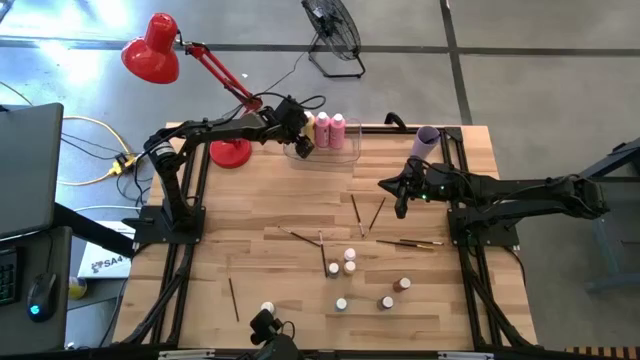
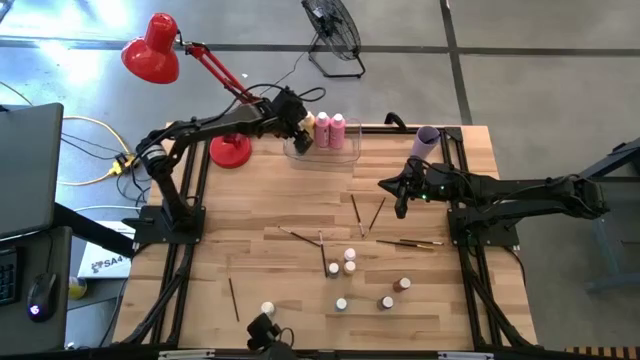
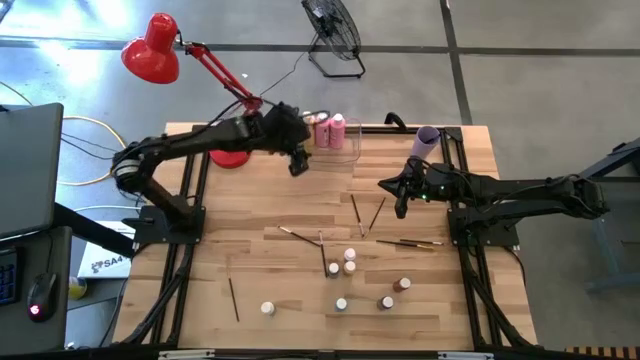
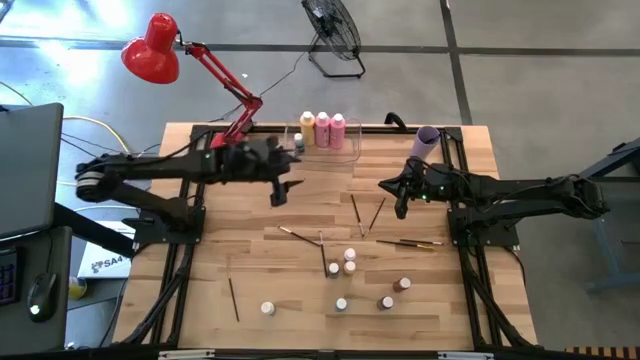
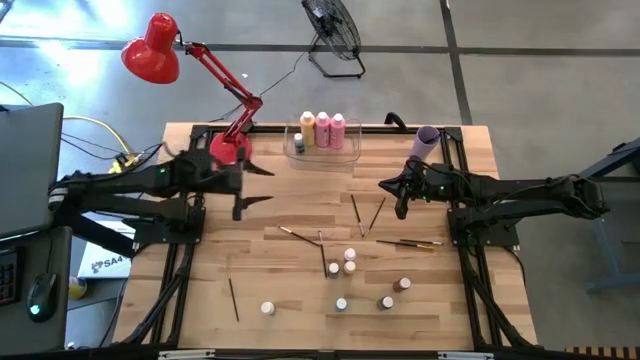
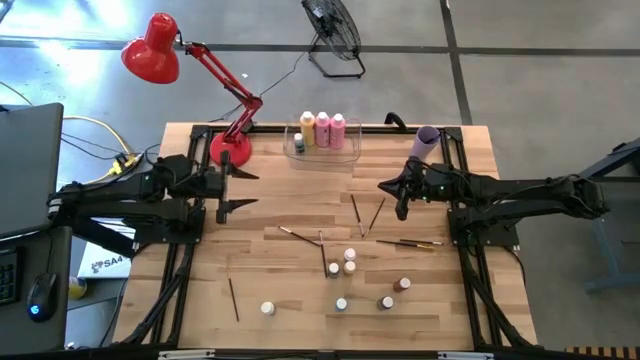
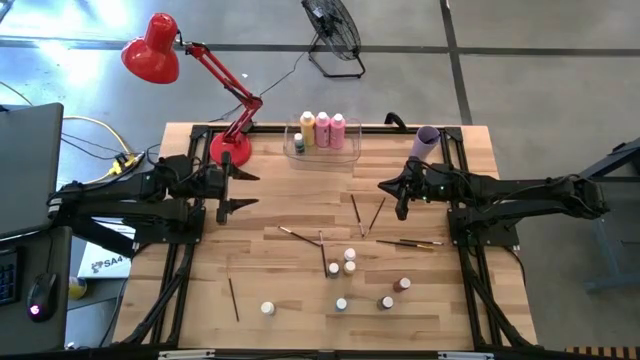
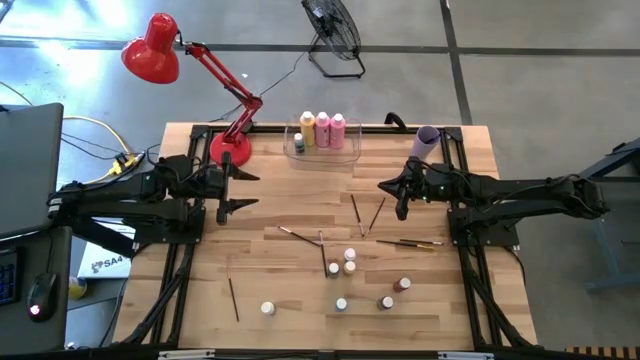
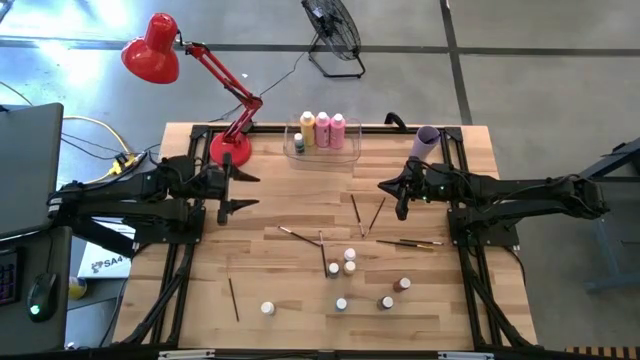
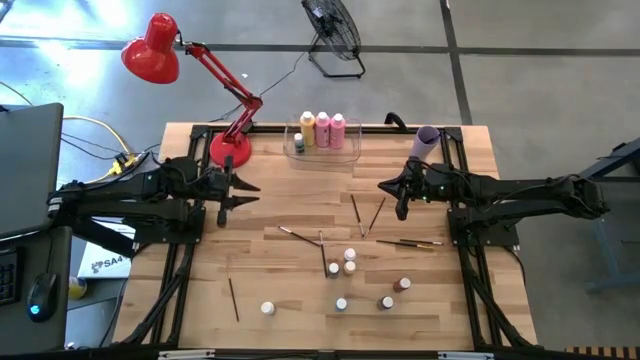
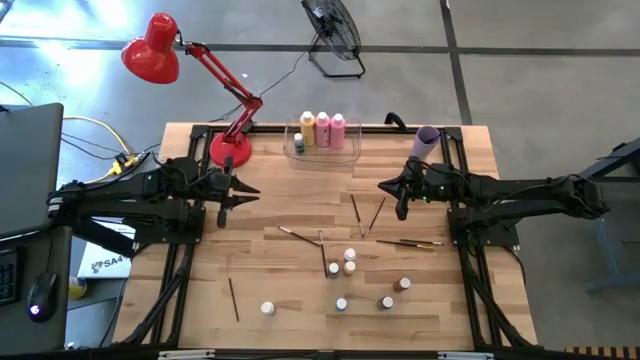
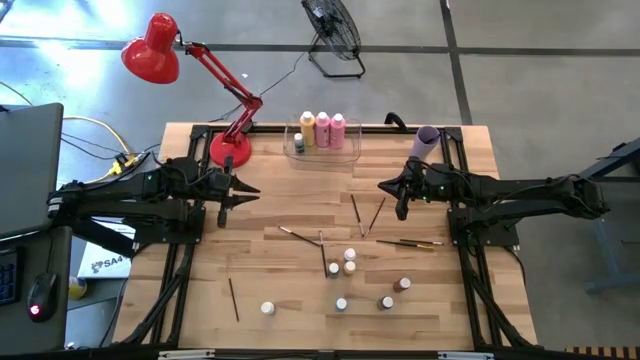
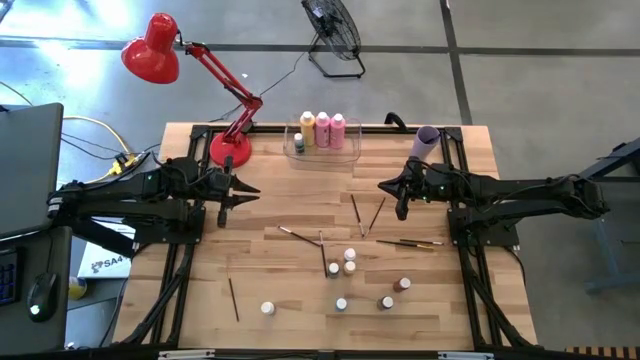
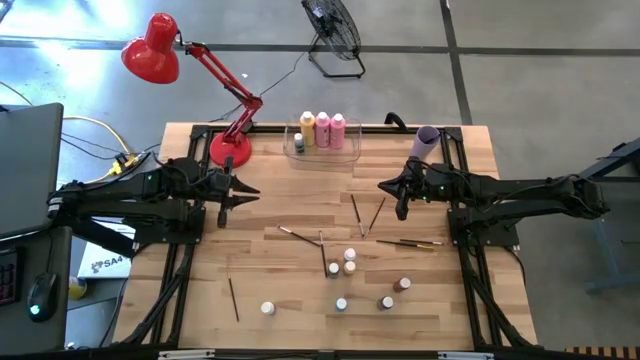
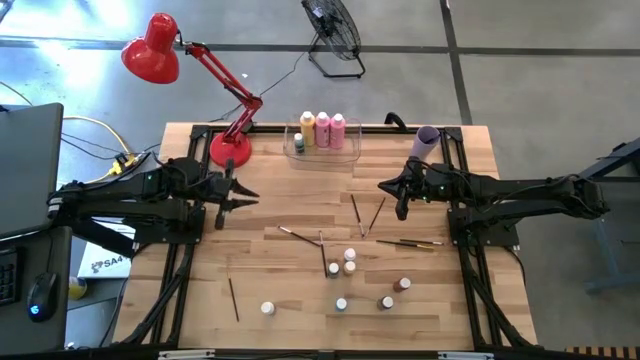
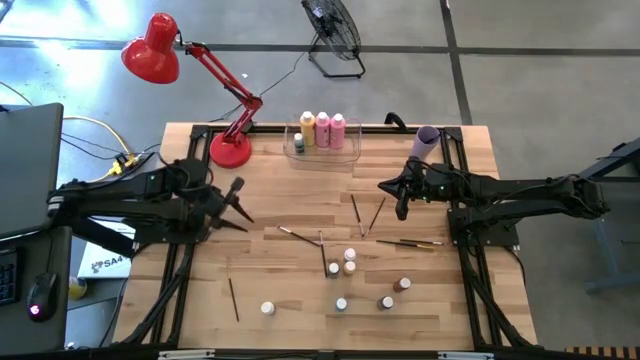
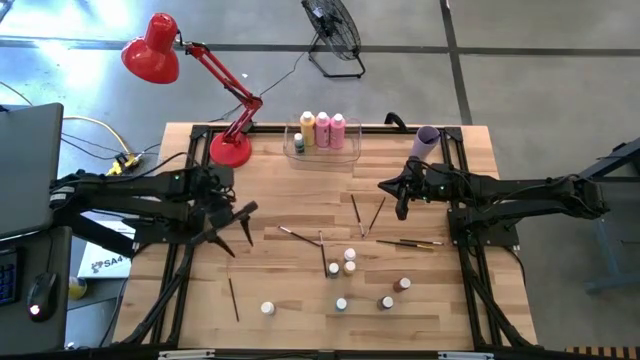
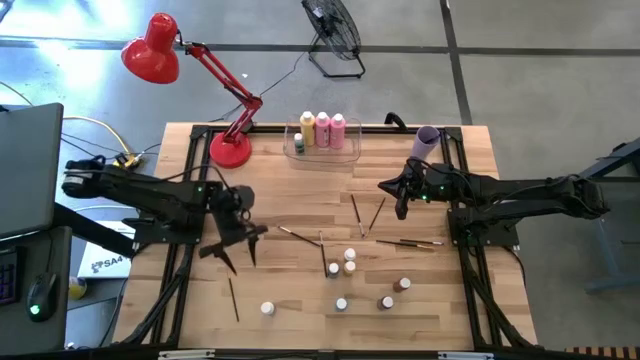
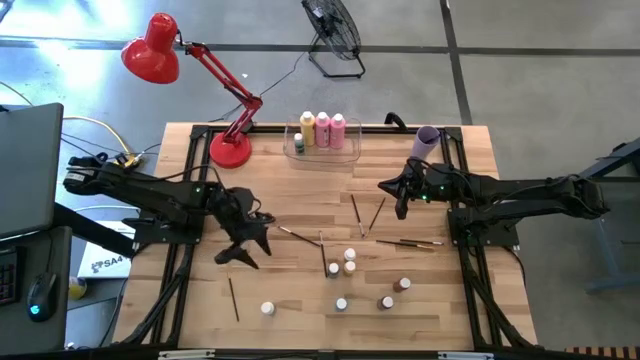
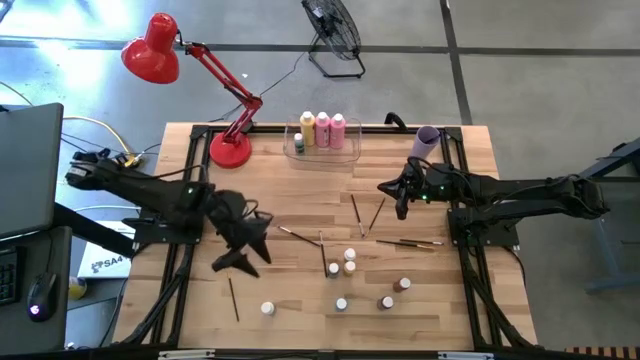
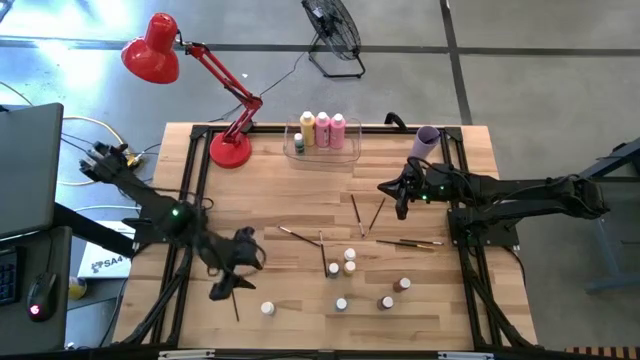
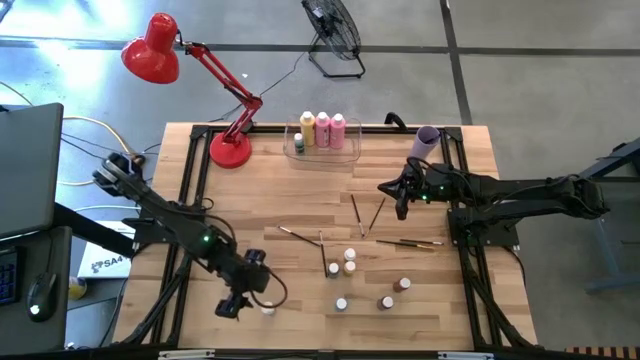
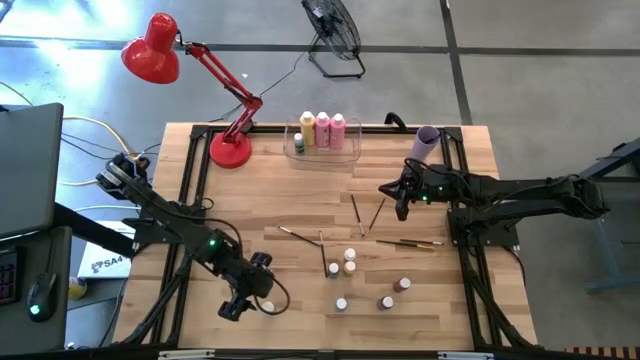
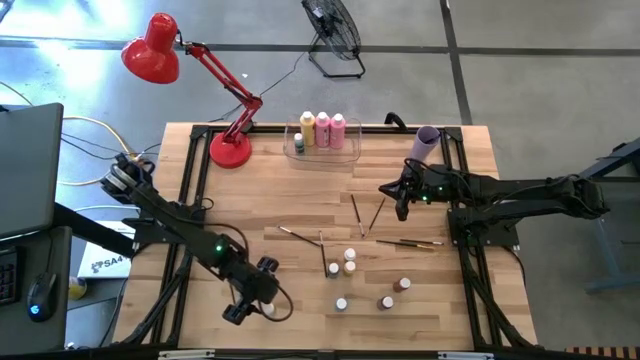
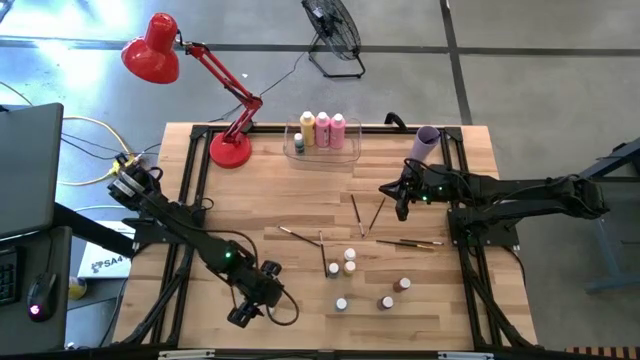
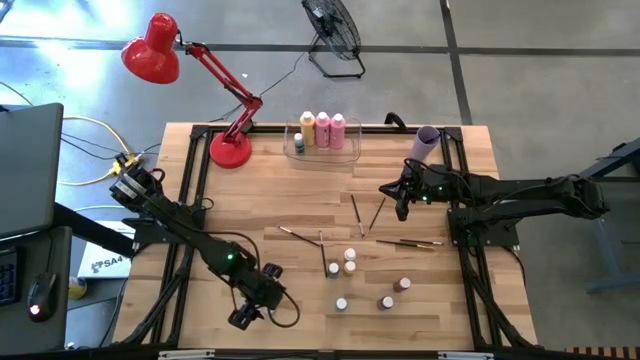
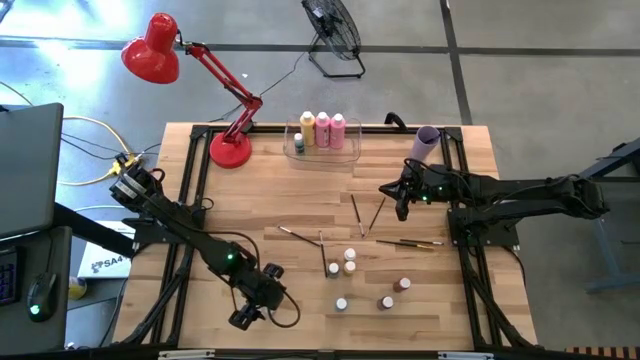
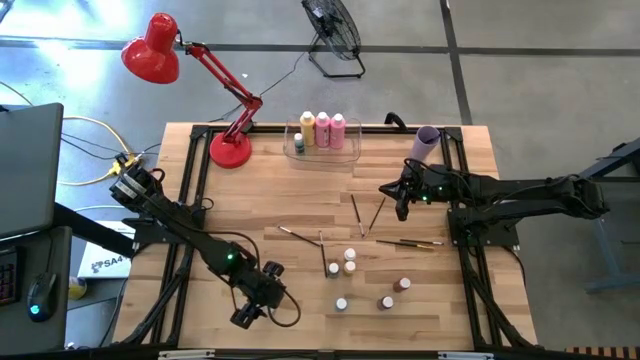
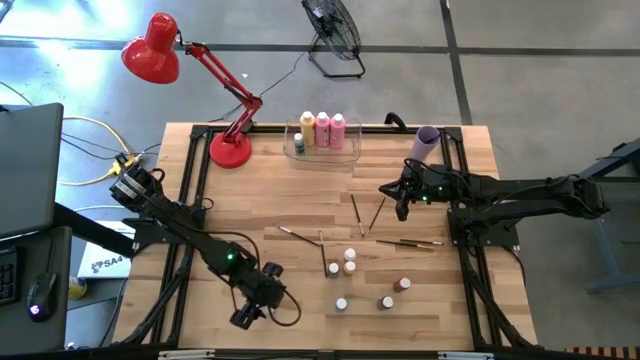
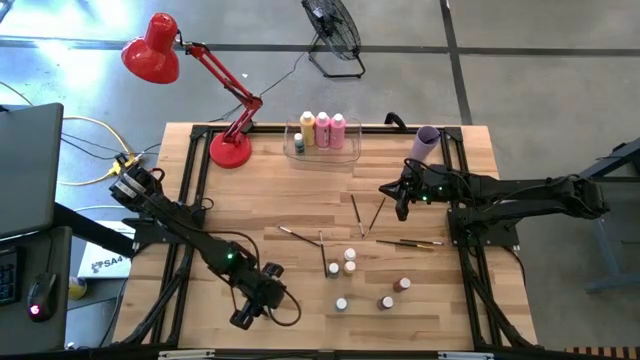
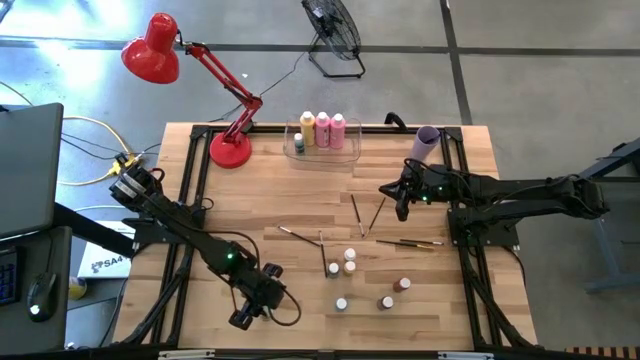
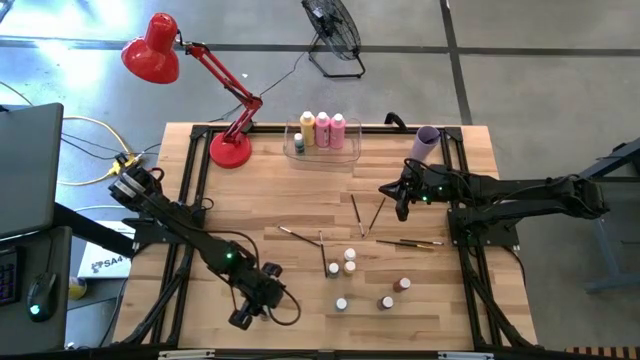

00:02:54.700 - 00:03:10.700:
Task: Pick & Place Paint Supplies
Put the small white paint bottle into the transparent bin

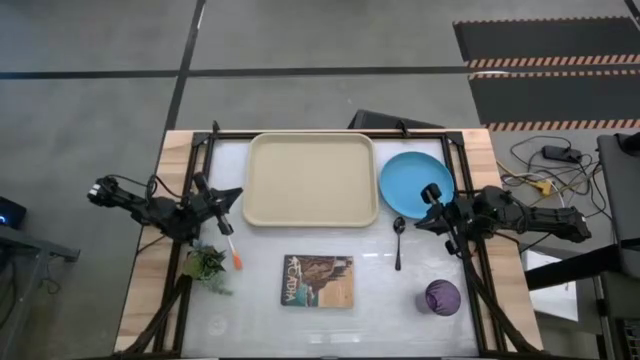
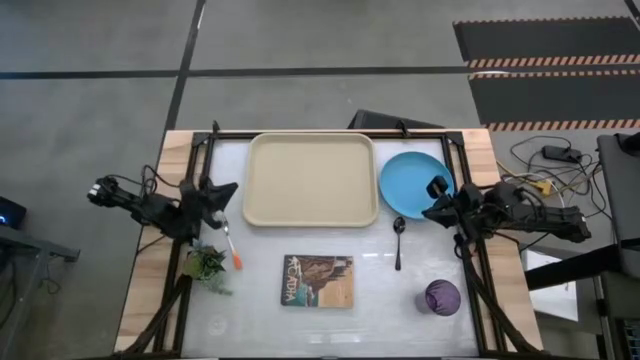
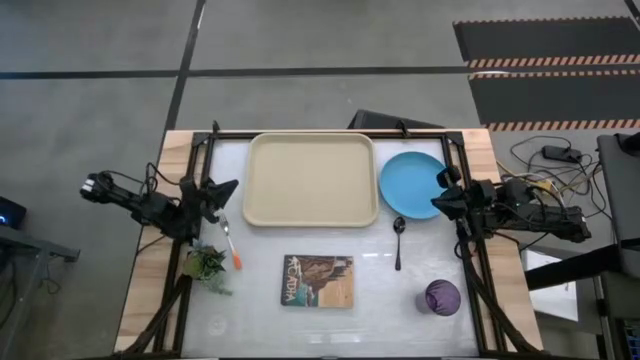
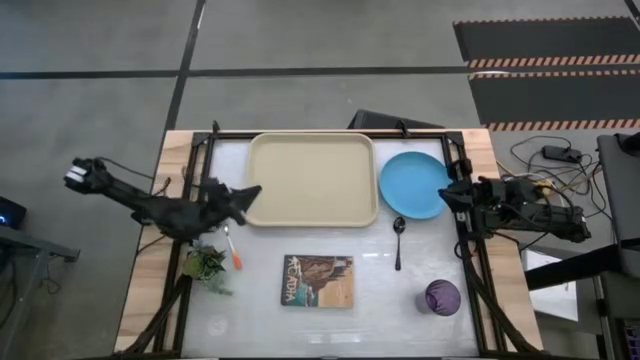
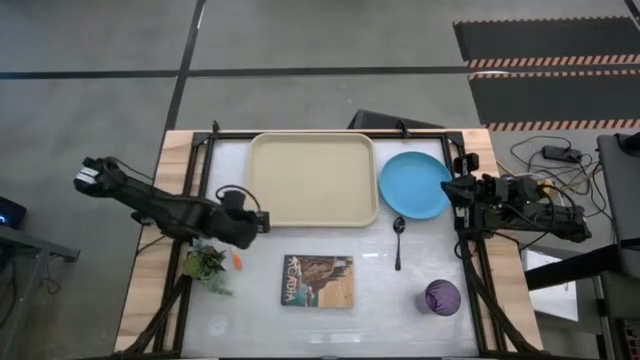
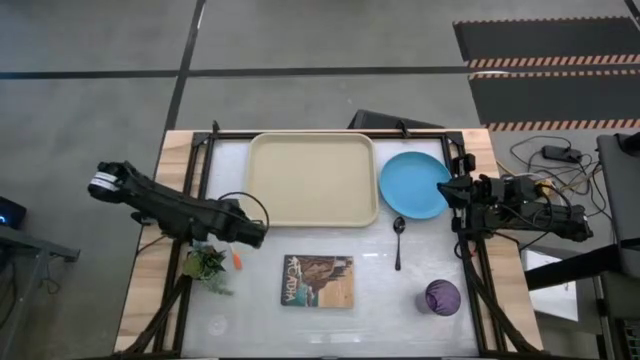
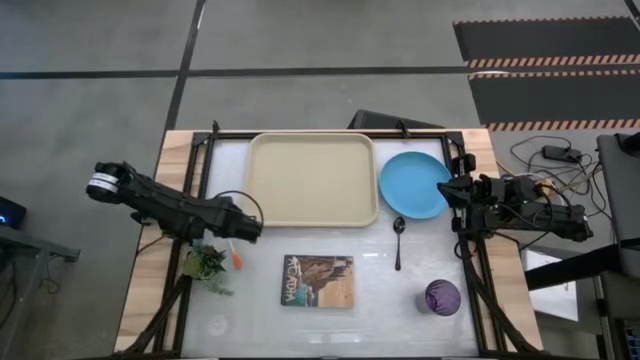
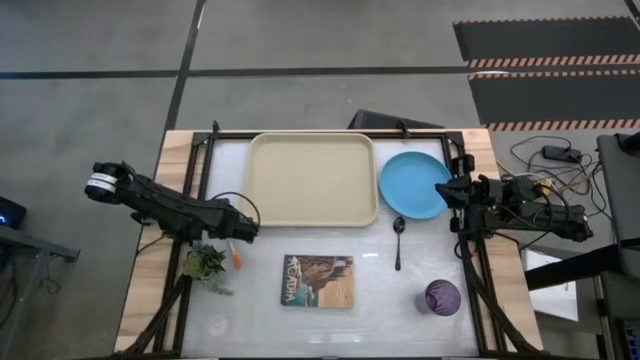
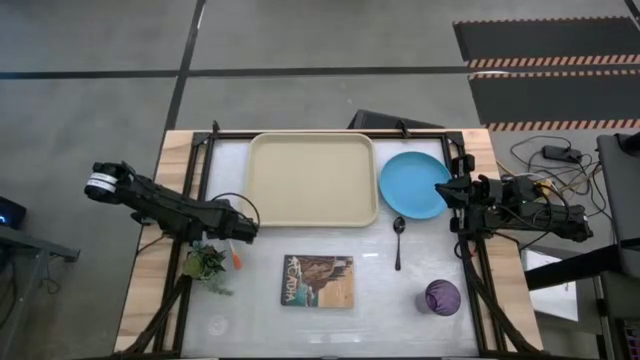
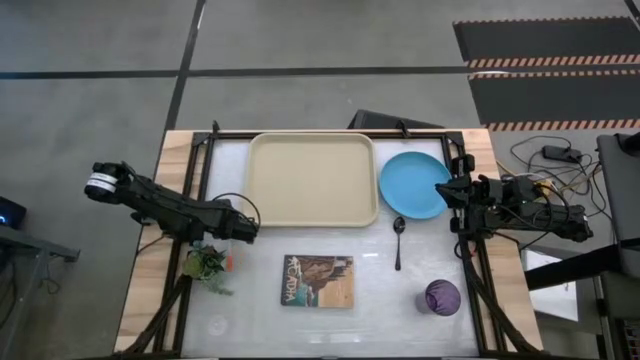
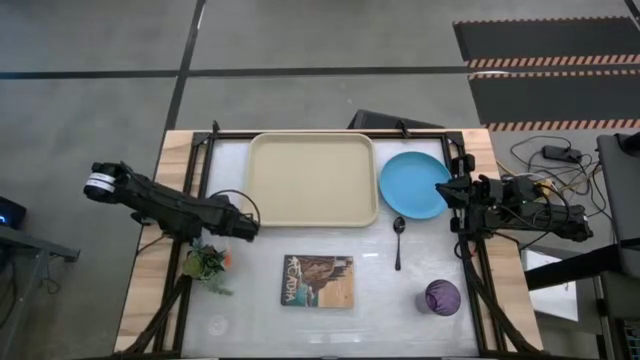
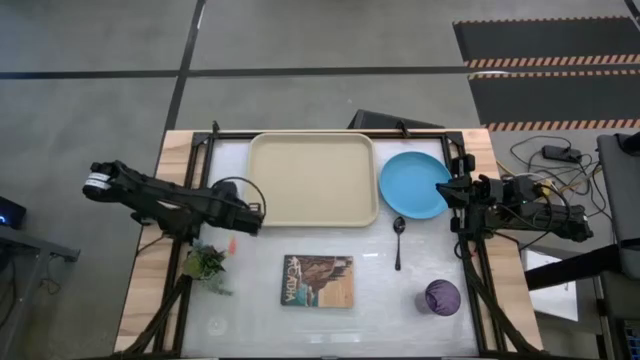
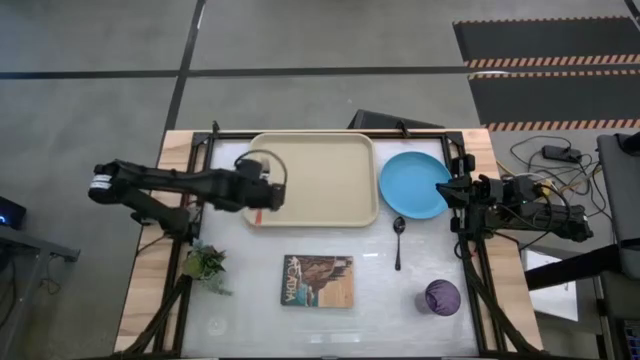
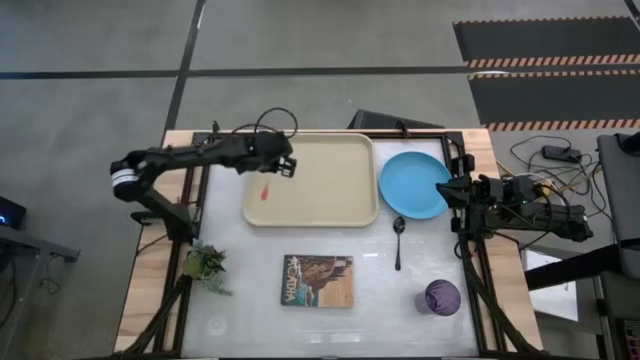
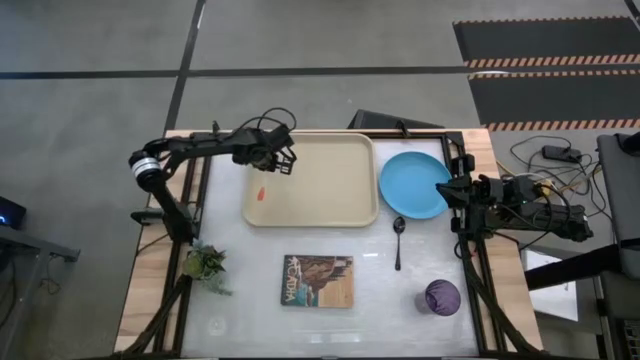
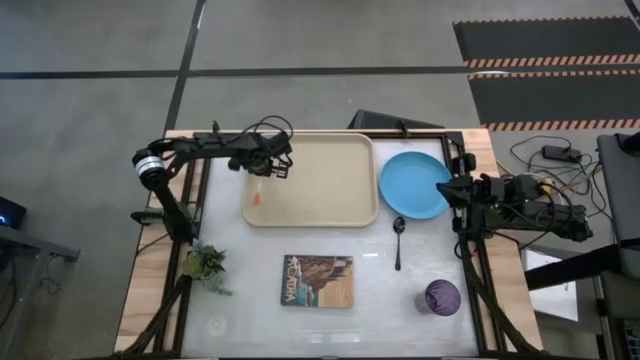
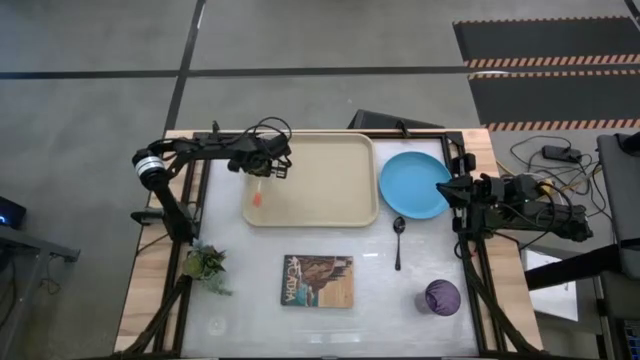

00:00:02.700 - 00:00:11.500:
Task: Pick and place plate/cup/fork/spoon on tray
Put the orange fork on the light brown tray
